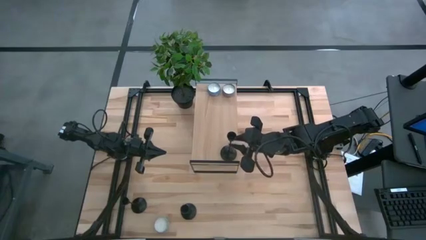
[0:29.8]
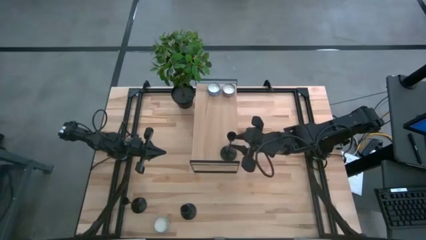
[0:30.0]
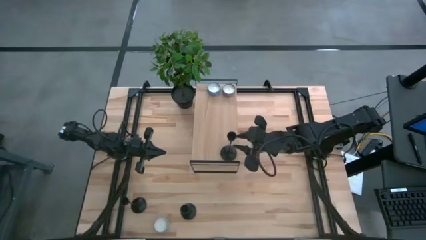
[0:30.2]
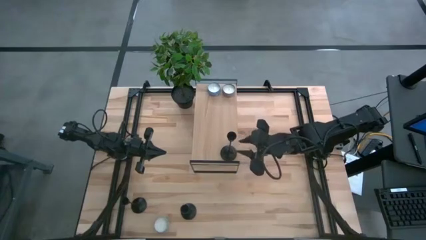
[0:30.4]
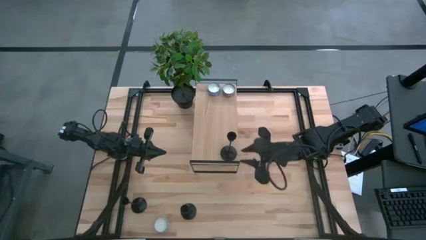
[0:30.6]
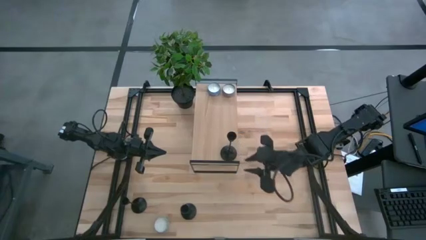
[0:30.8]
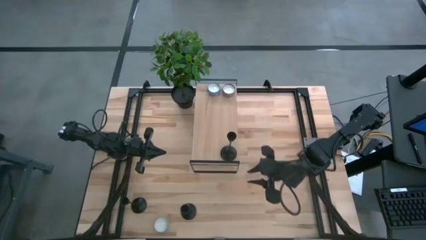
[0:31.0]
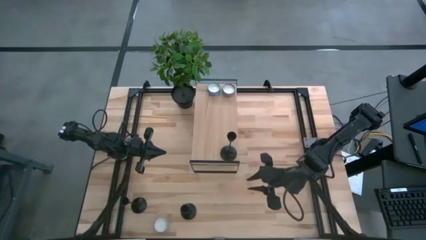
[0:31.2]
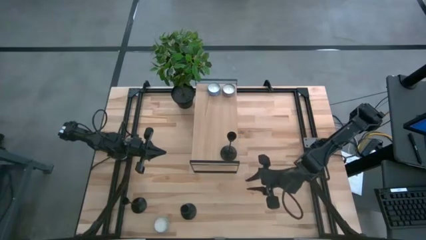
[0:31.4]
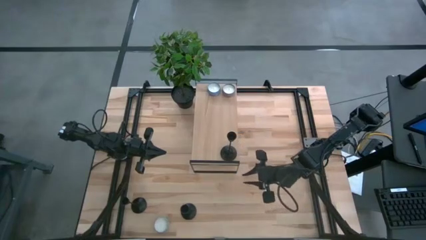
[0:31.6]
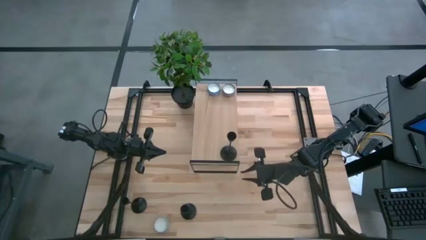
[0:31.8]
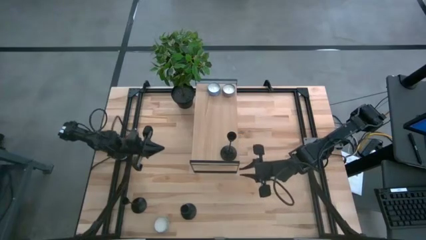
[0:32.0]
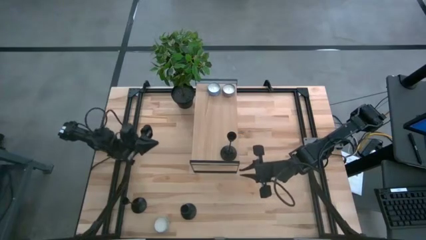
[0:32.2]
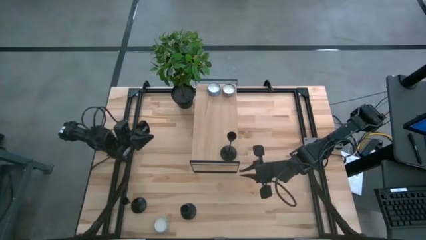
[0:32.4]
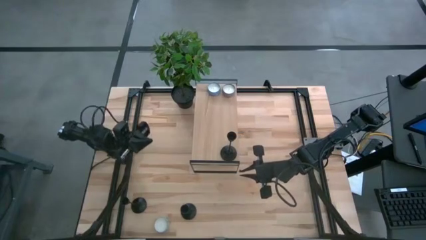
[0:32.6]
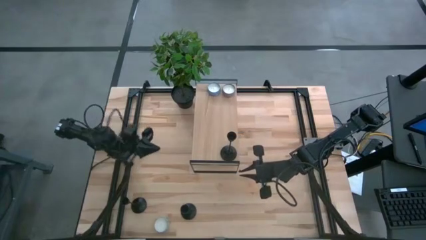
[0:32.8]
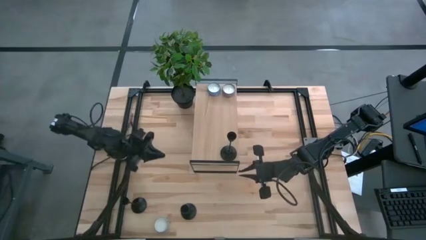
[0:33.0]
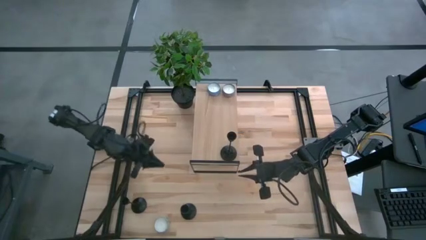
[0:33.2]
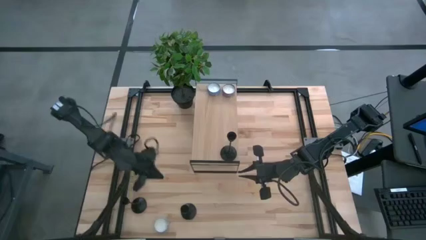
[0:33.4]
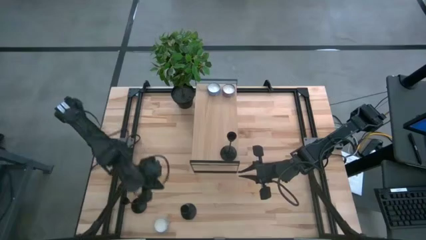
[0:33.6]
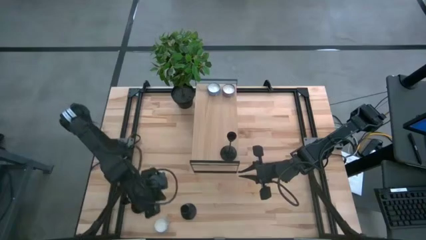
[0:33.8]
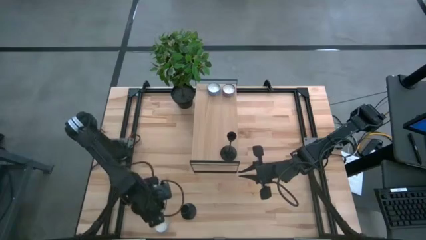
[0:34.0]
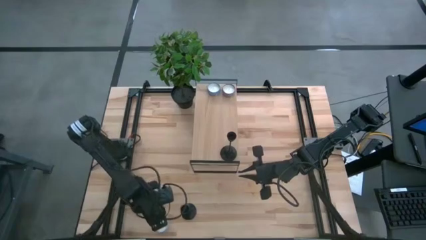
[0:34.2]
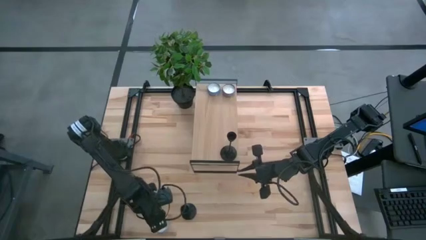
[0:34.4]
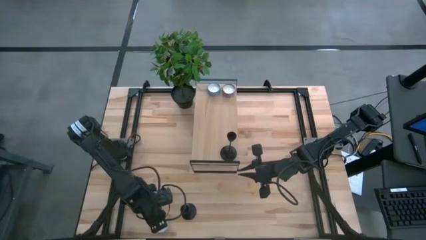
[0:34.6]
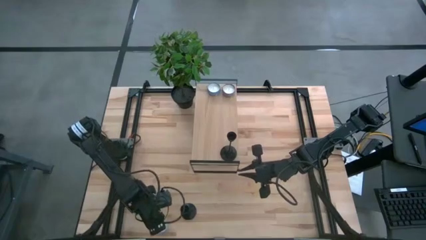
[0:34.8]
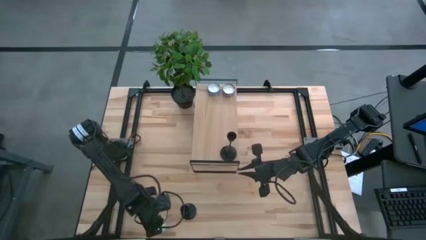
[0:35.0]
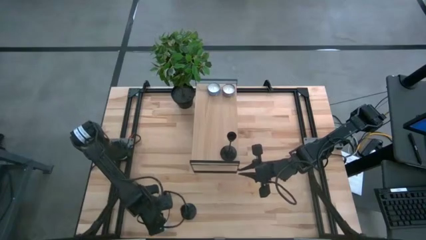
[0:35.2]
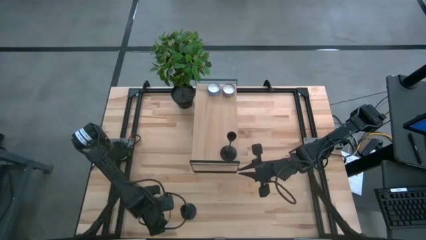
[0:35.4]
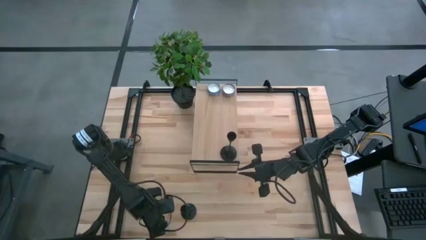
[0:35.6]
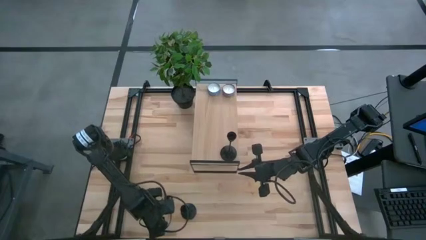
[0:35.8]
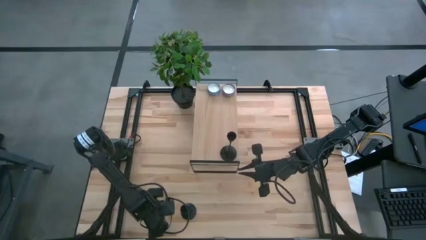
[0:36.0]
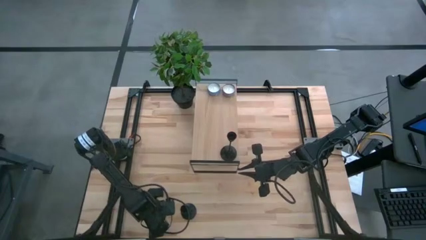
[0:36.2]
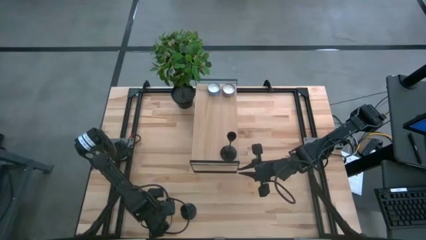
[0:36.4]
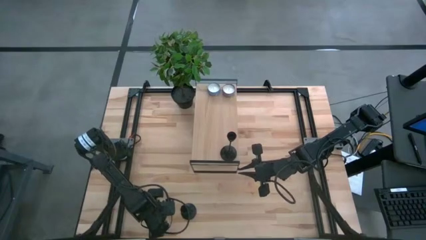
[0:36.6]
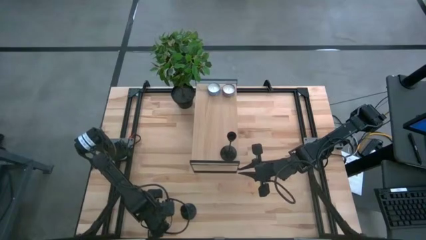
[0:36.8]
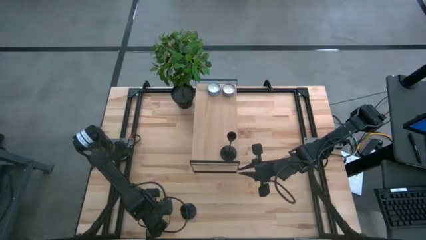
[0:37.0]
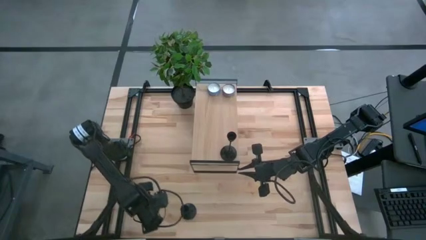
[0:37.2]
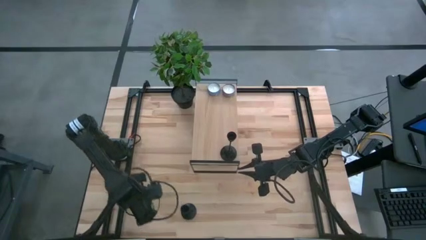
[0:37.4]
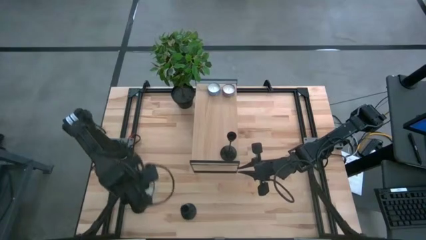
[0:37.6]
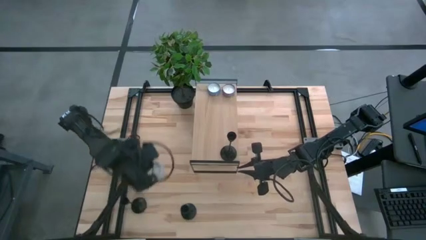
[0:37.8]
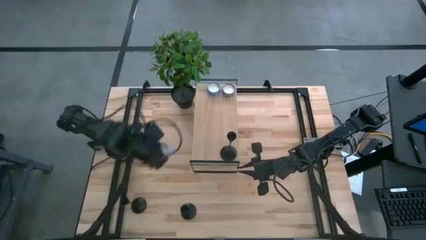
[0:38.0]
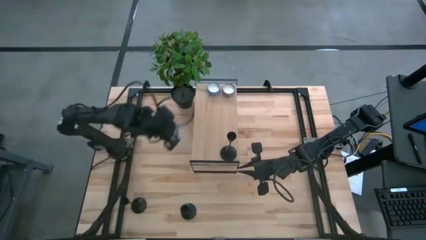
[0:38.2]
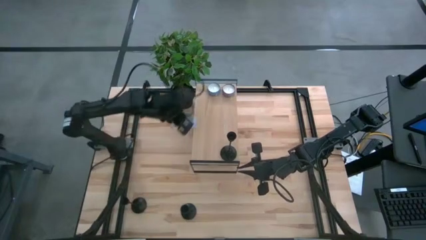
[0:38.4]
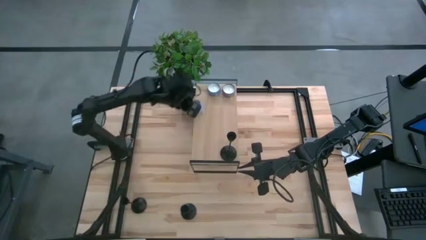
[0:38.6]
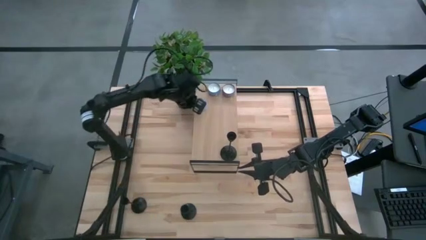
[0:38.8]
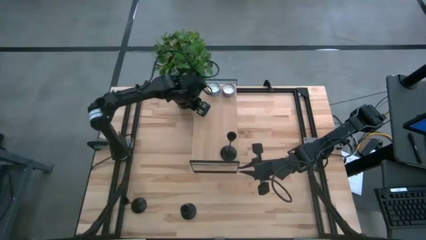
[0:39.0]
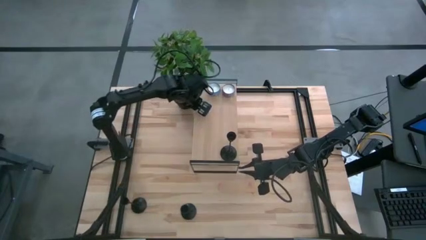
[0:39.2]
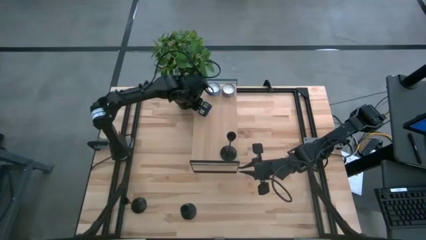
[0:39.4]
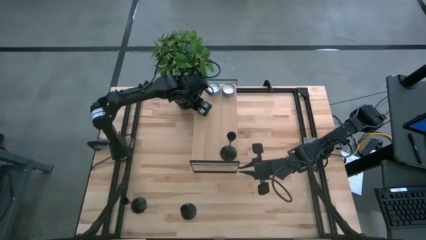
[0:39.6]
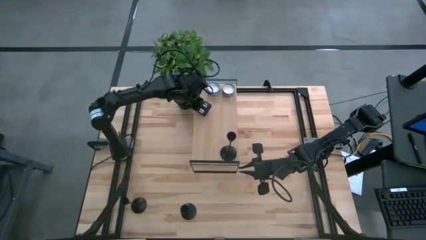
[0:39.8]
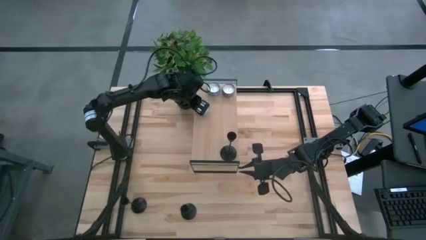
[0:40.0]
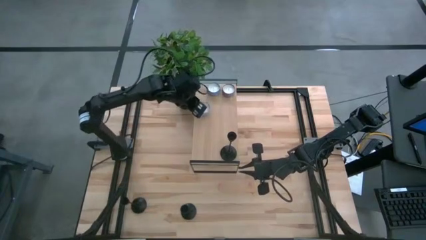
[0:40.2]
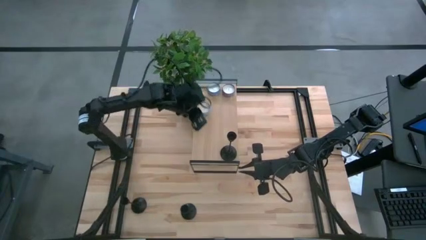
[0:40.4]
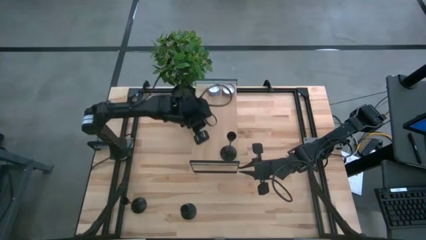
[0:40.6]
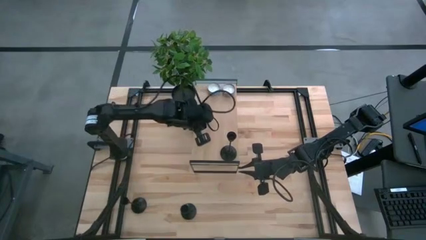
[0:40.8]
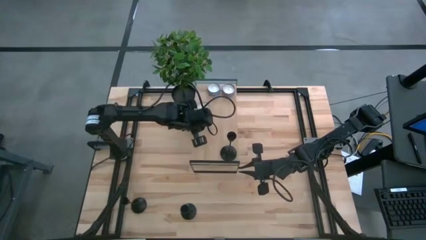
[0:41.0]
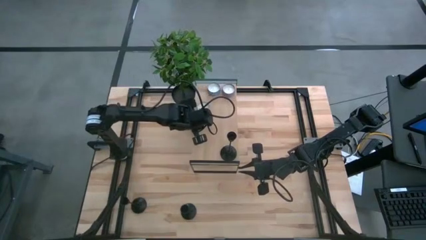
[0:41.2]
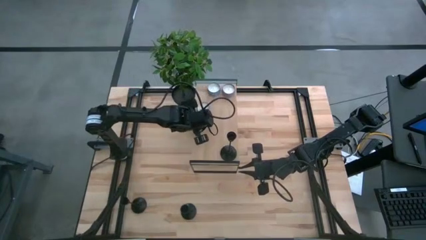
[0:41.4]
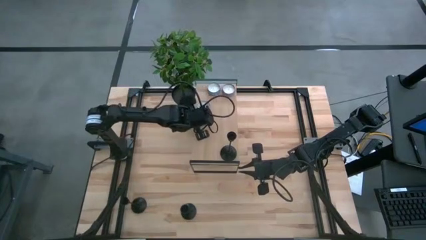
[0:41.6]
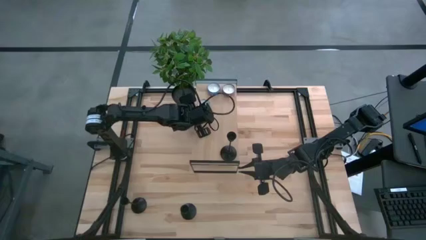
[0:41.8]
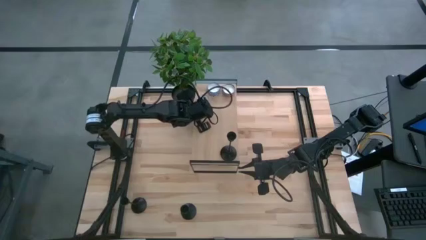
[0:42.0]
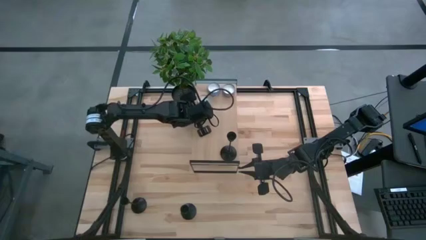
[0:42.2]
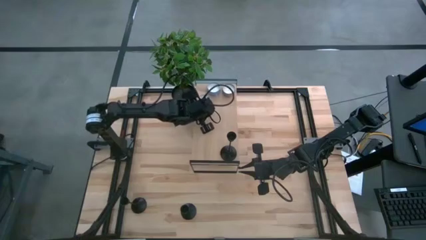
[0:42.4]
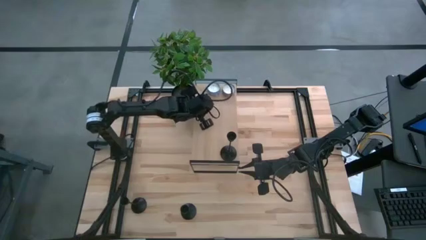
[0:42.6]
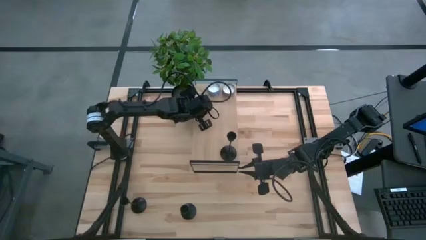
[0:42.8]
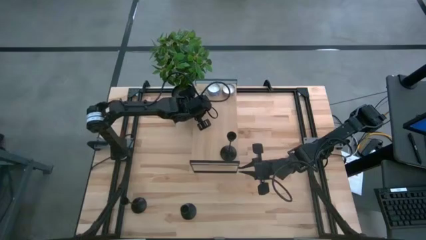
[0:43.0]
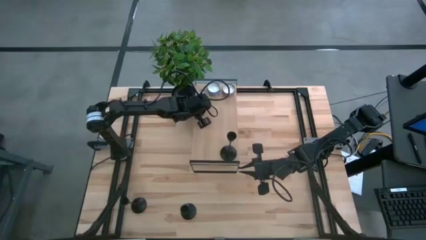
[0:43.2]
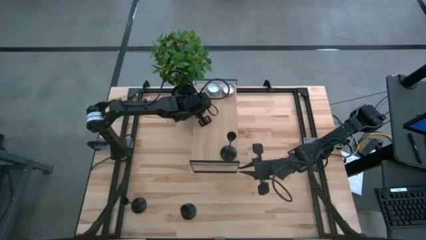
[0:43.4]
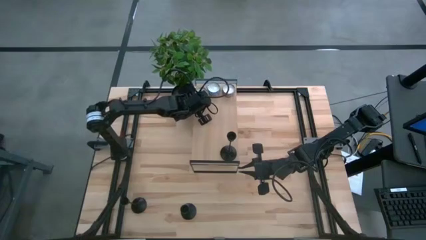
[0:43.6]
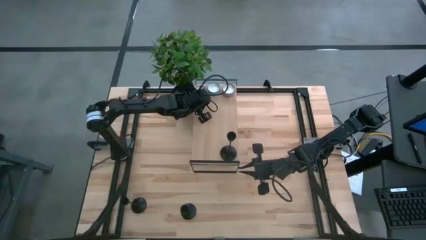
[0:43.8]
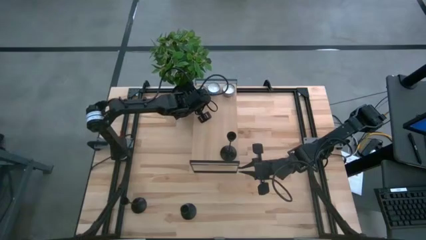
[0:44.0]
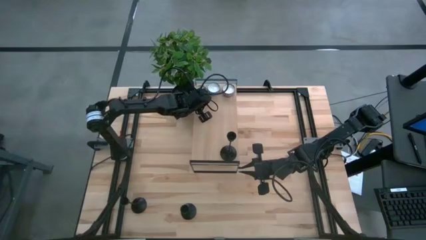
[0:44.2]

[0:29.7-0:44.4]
Task: Pick & Place candle stick holders
Put the white candle on the shelf
